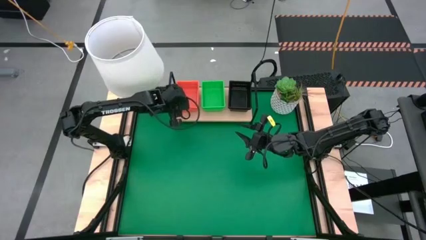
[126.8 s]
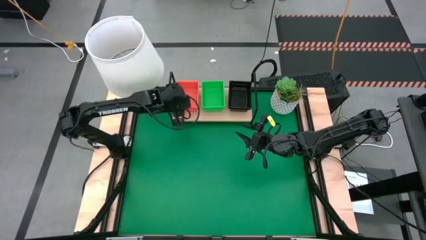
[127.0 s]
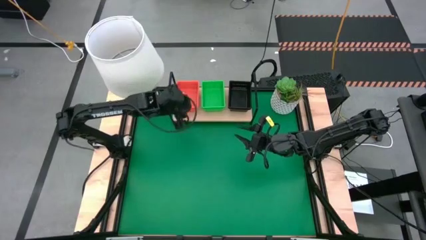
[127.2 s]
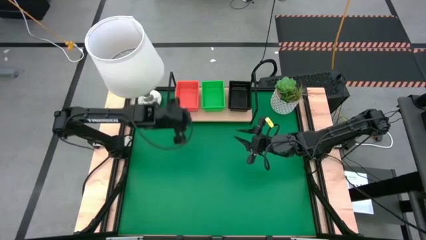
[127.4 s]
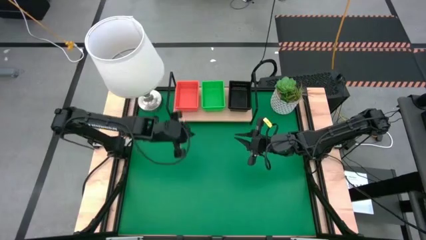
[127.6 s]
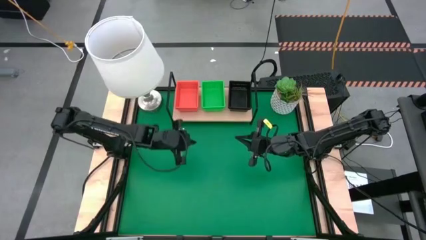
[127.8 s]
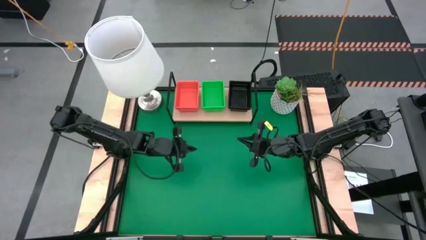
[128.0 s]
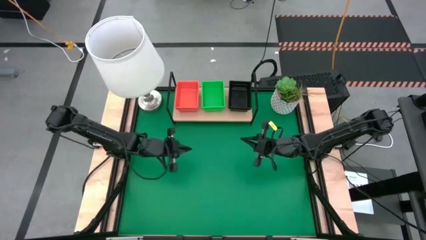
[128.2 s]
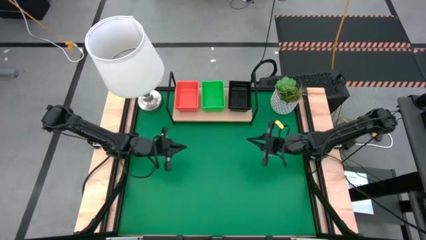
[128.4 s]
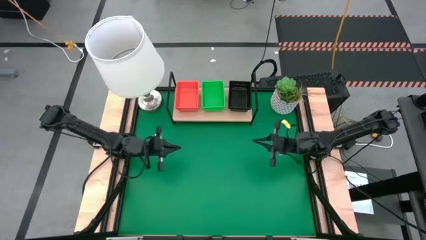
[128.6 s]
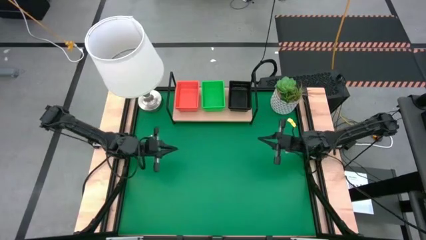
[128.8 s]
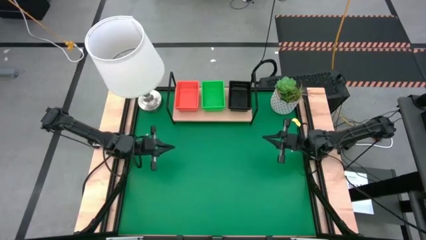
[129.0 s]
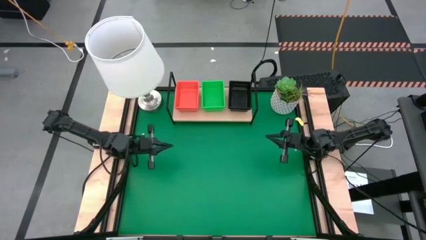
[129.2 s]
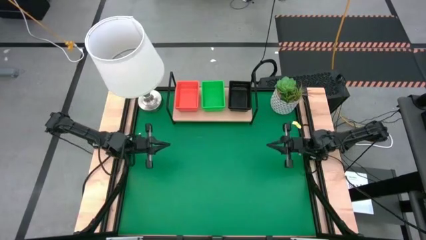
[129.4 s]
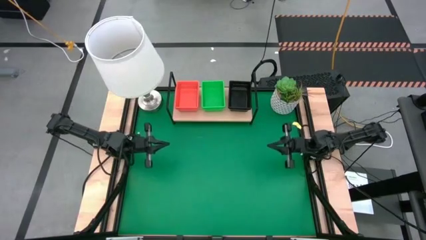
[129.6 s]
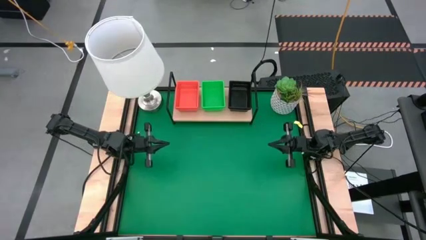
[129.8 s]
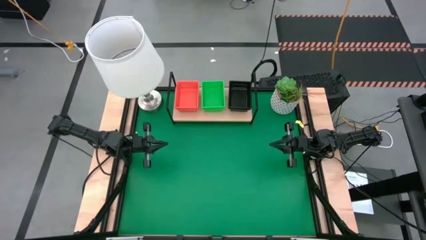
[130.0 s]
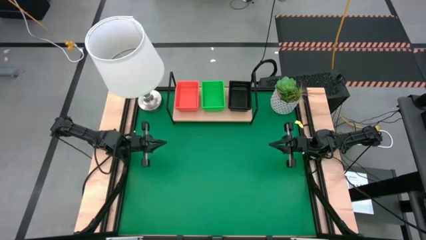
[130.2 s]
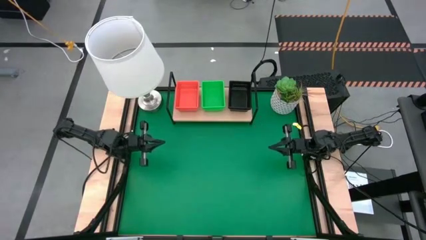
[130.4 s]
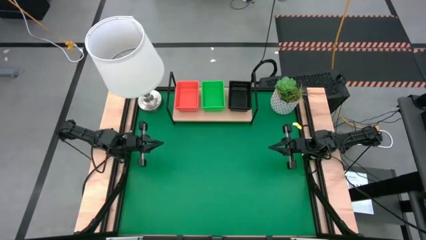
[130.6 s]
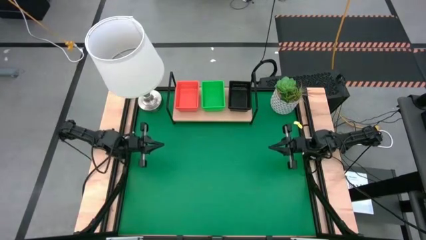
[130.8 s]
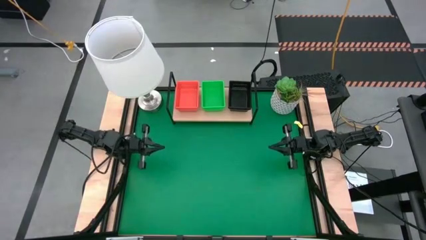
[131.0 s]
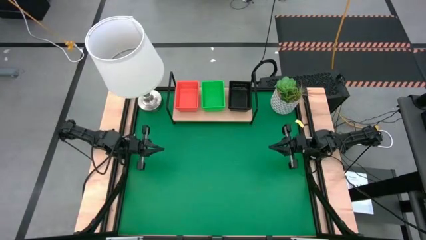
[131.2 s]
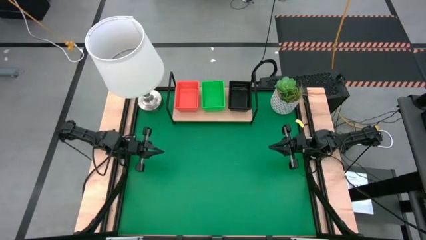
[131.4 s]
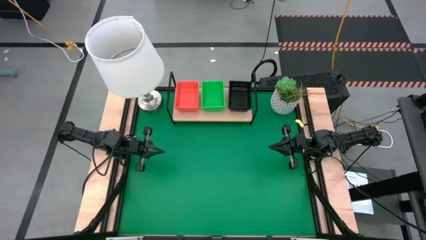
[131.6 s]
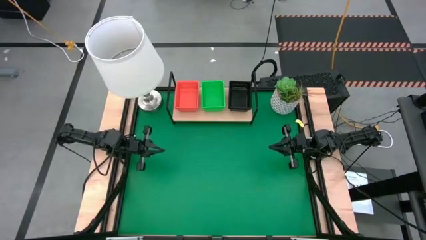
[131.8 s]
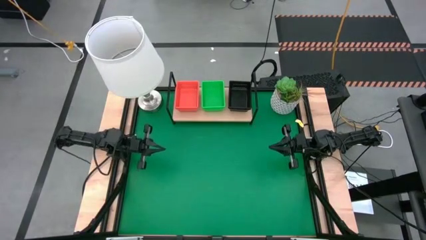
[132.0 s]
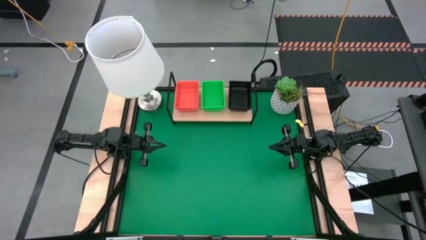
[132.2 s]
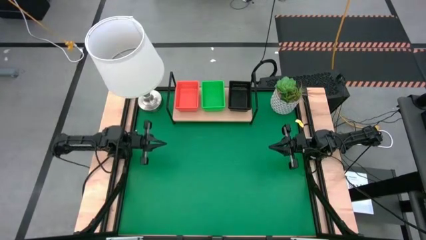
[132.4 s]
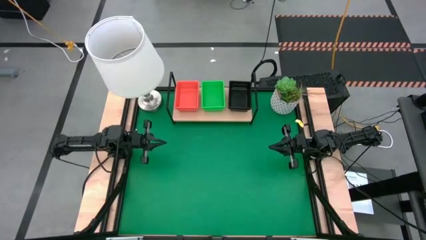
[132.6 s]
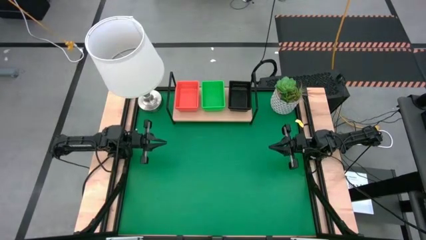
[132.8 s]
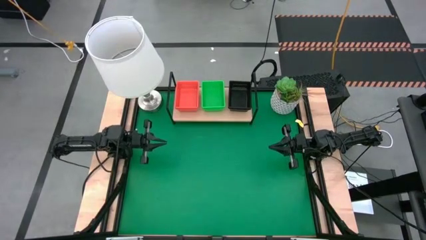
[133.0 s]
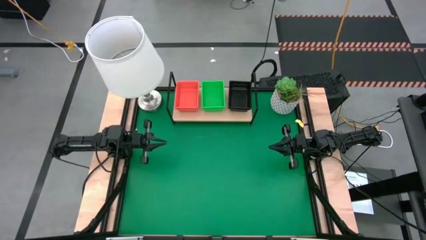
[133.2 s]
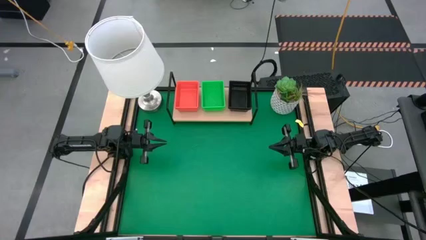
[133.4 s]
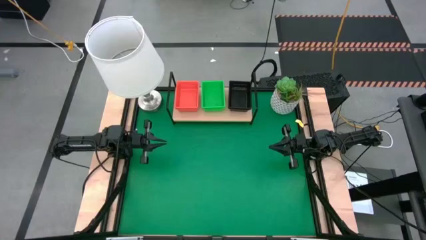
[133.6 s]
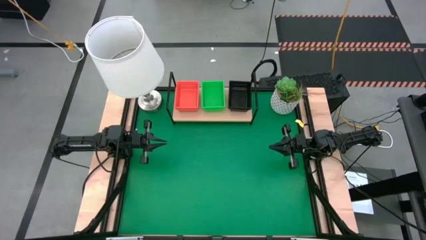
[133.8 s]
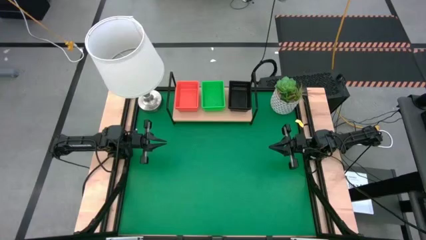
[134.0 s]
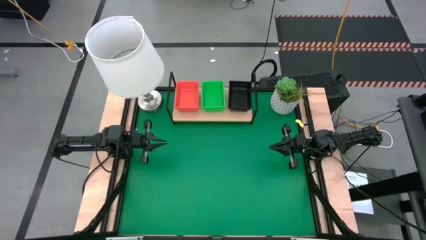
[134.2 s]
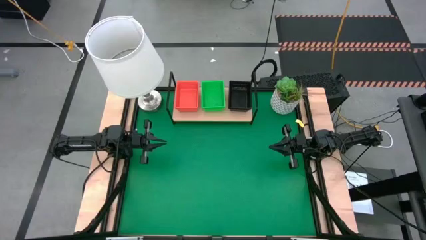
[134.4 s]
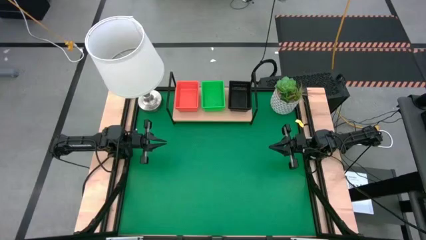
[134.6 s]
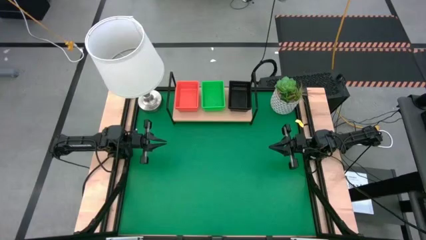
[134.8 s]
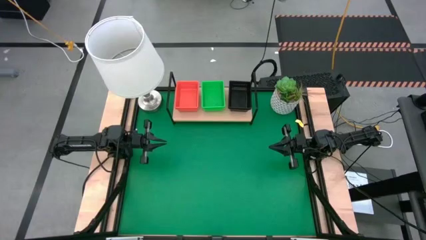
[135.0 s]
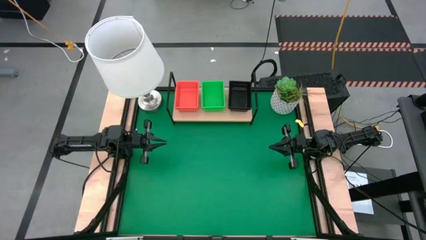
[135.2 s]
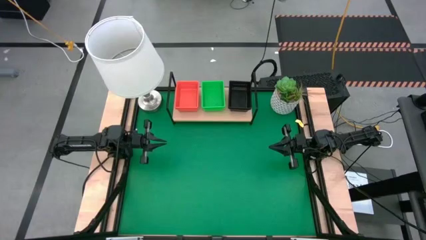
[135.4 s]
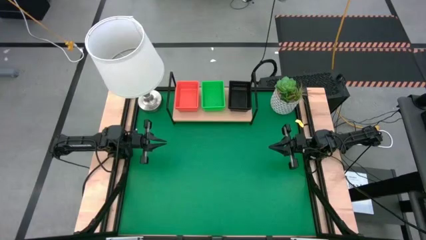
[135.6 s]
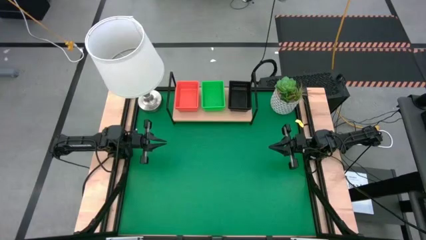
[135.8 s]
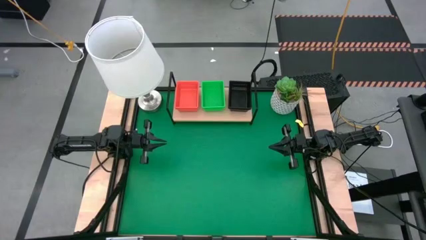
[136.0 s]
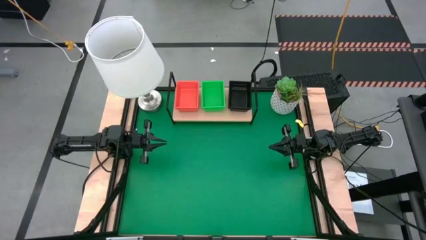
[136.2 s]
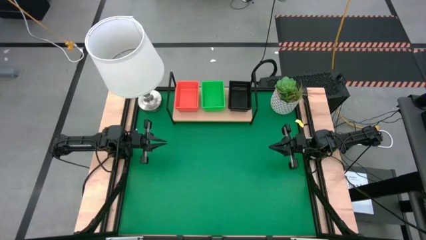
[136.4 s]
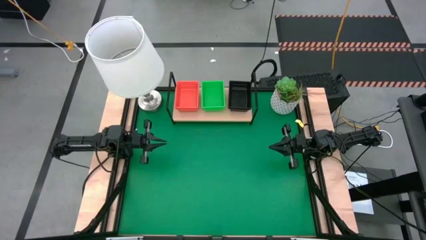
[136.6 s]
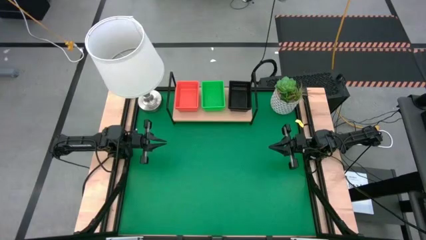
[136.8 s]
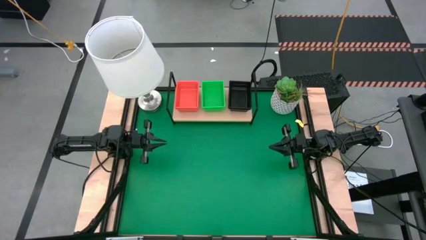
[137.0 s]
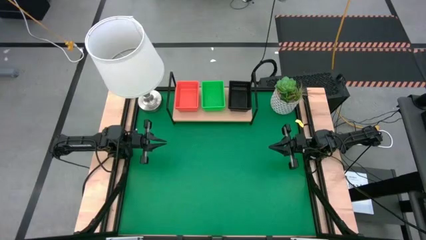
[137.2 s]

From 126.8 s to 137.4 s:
Task: Stack baskets on shelf by color
Return to Home Position

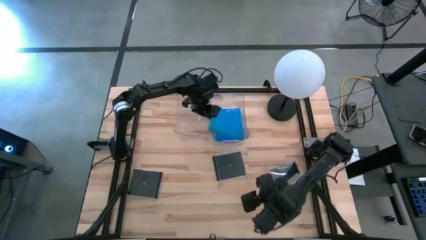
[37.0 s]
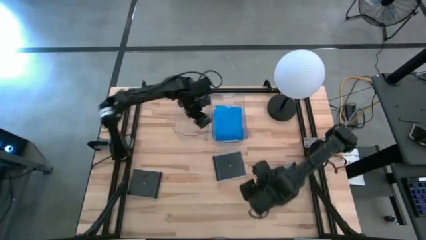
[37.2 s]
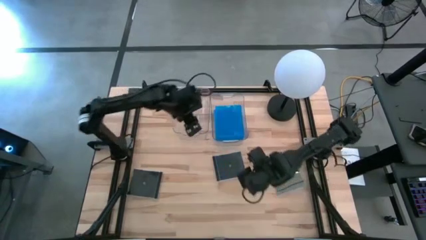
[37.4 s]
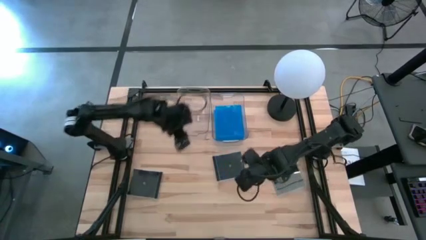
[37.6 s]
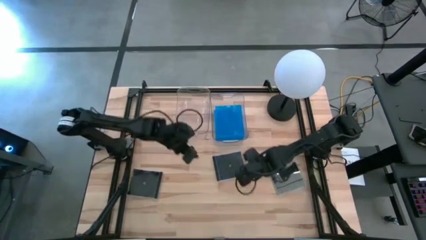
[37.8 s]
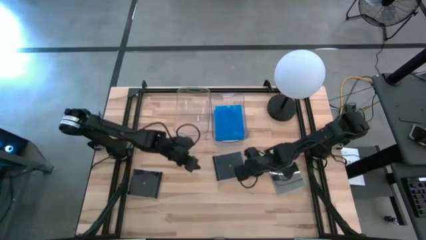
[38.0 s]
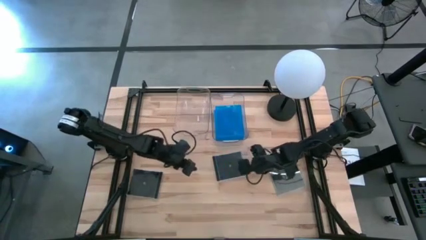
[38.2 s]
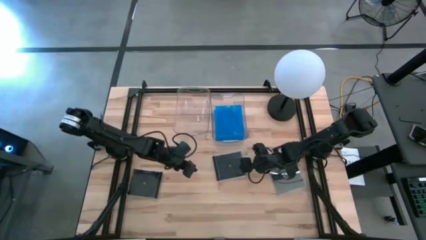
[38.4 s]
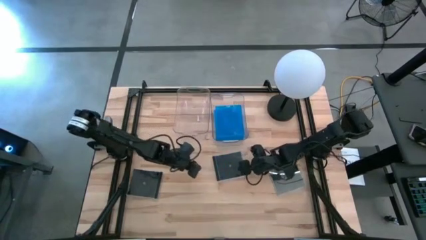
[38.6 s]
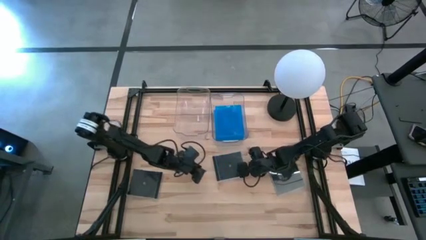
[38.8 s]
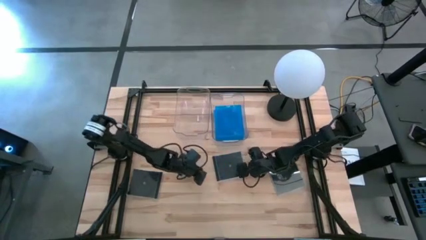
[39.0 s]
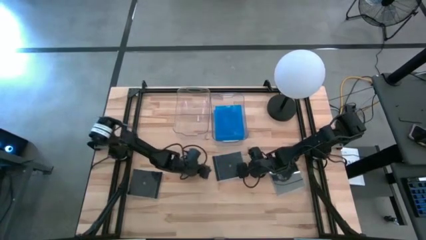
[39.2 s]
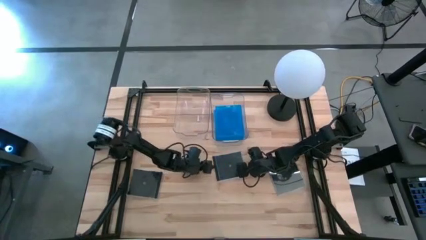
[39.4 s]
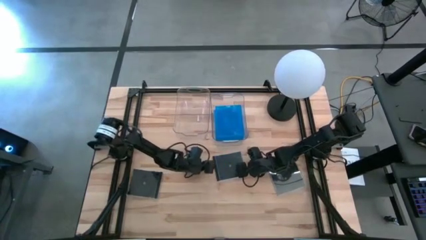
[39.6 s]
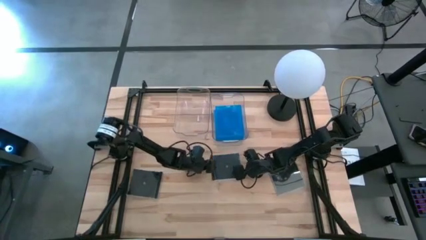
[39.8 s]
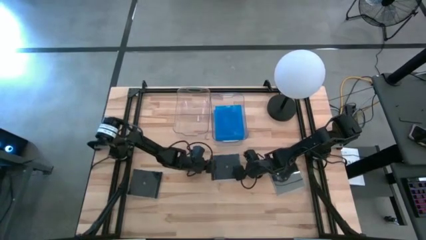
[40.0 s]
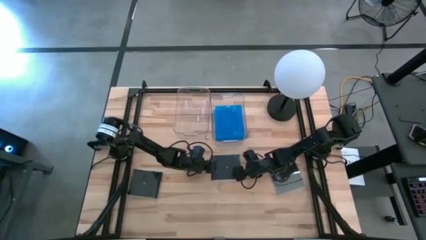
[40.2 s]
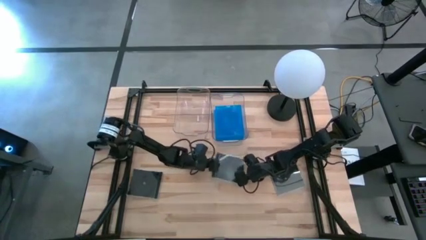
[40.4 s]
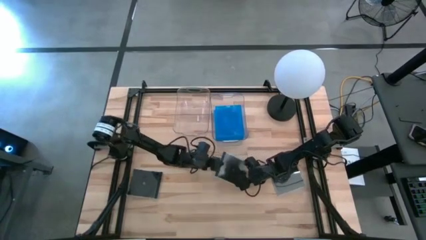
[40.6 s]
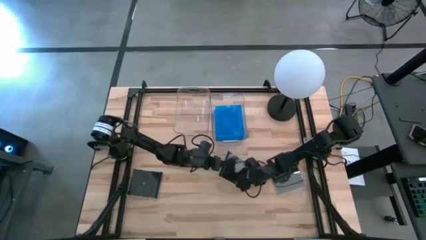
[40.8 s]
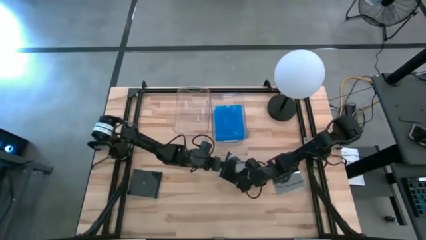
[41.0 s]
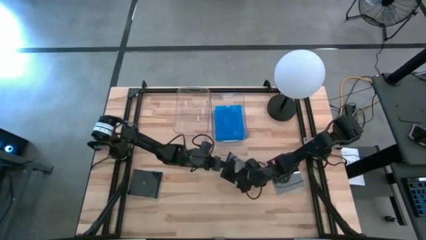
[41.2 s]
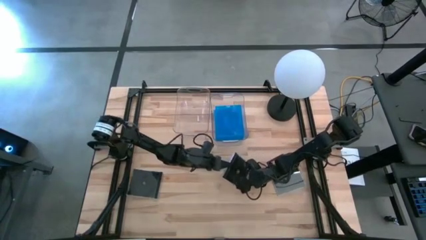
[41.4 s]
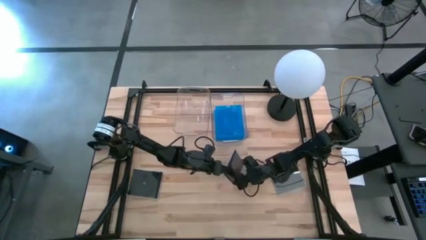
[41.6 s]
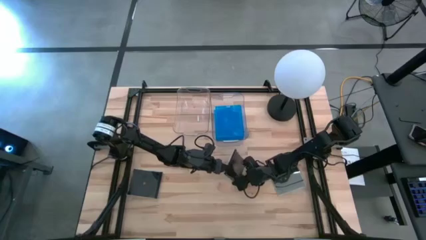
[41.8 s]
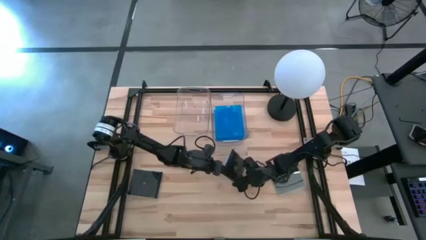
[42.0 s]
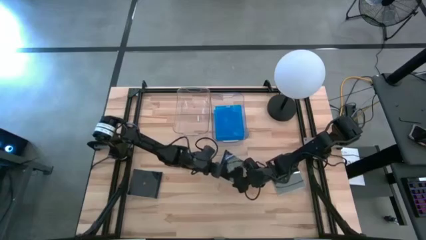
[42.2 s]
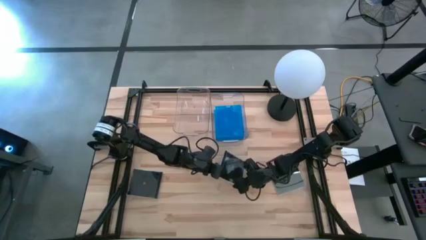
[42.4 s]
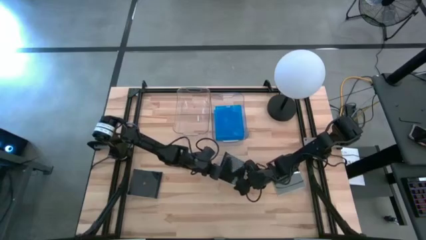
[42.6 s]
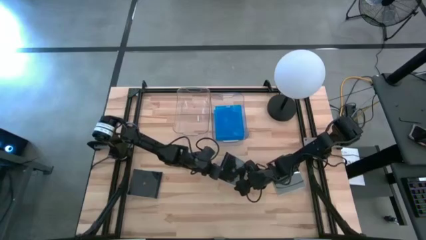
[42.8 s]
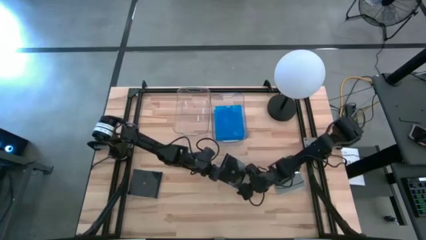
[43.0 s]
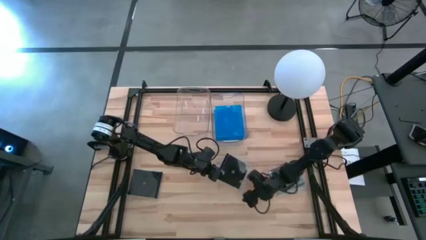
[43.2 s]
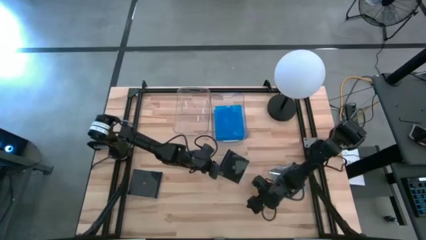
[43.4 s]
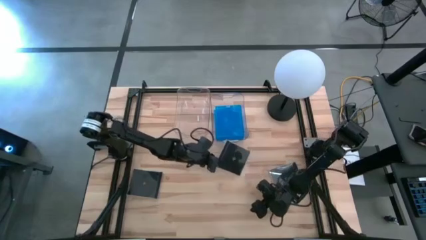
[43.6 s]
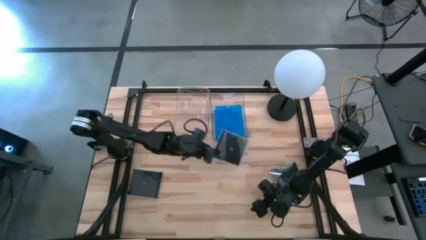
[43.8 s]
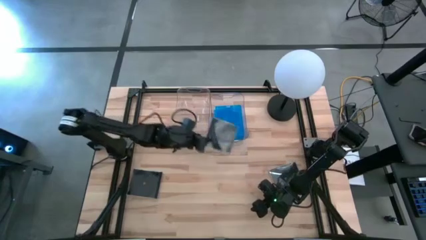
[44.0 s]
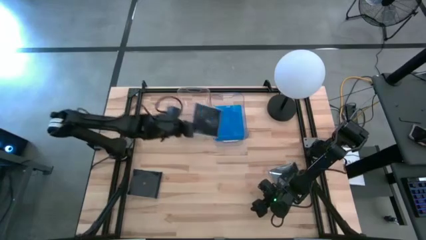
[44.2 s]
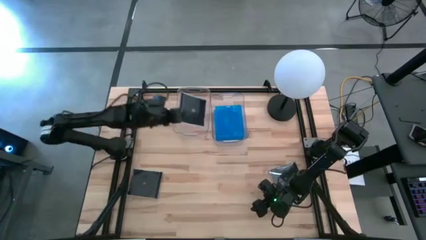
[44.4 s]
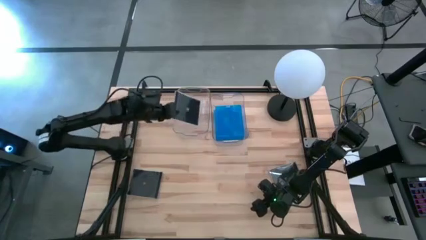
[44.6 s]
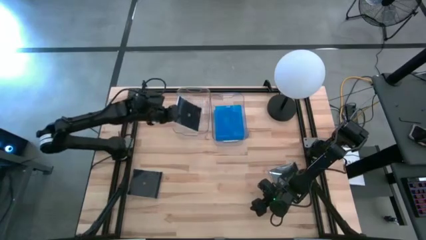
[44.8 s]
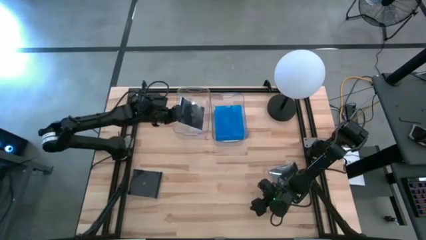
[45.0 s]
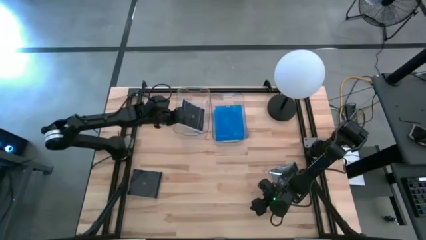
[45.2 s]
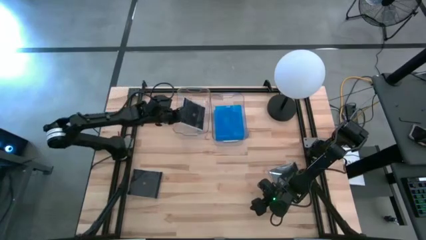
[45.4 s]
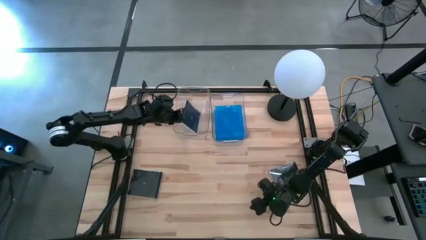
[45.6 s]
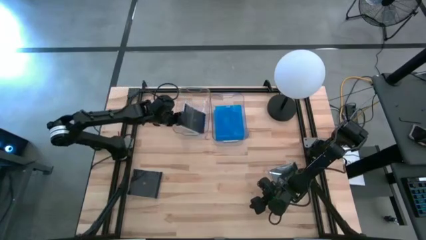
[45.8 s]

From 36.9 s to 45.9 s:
Task: Pick & place jewel cases by type
Put the middle black CD case into the left transparent bin
